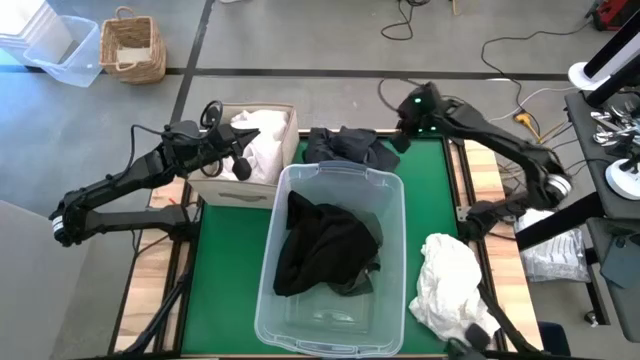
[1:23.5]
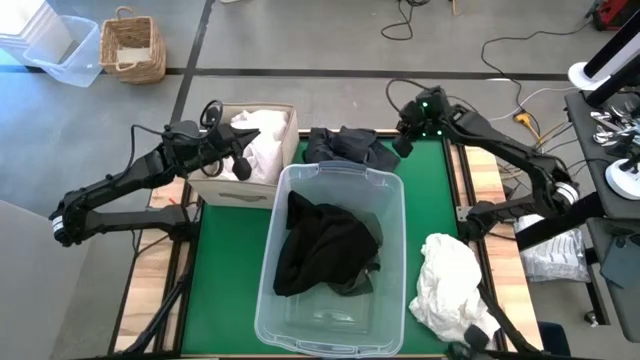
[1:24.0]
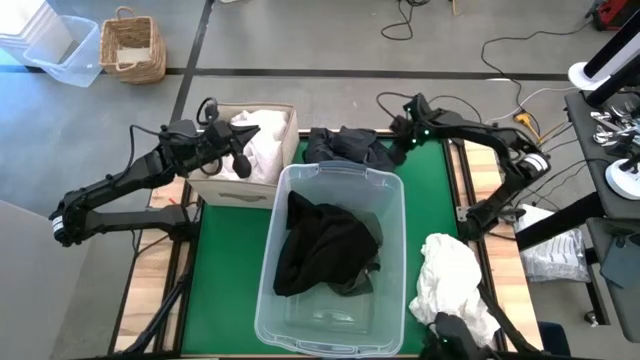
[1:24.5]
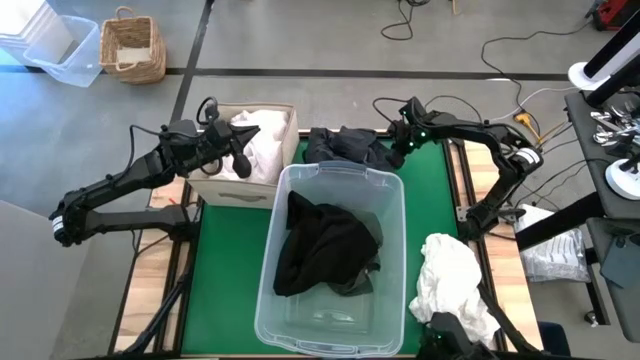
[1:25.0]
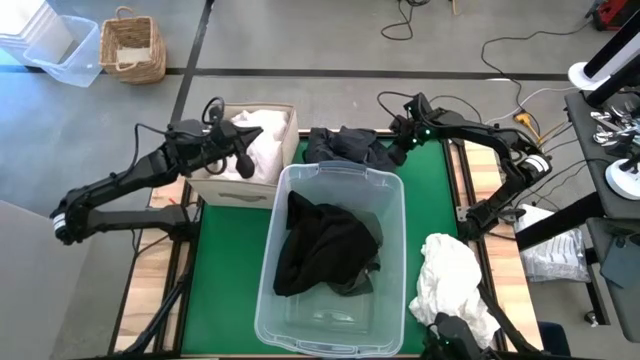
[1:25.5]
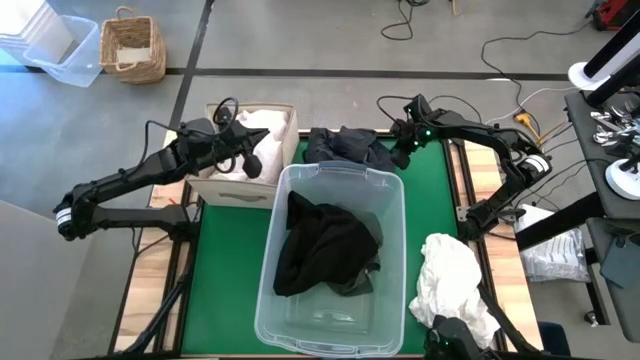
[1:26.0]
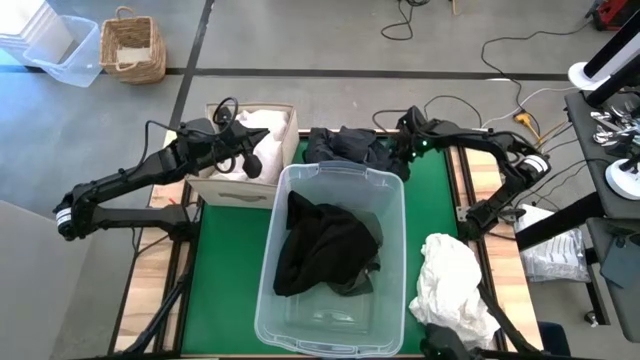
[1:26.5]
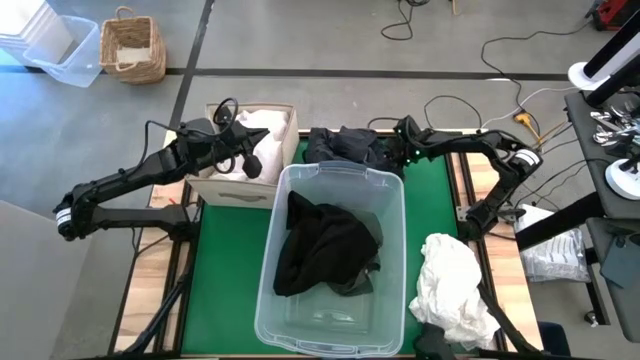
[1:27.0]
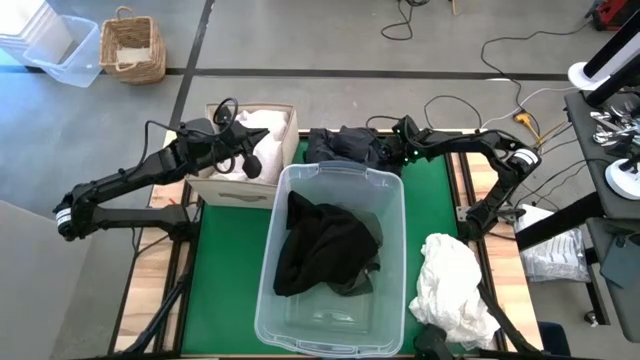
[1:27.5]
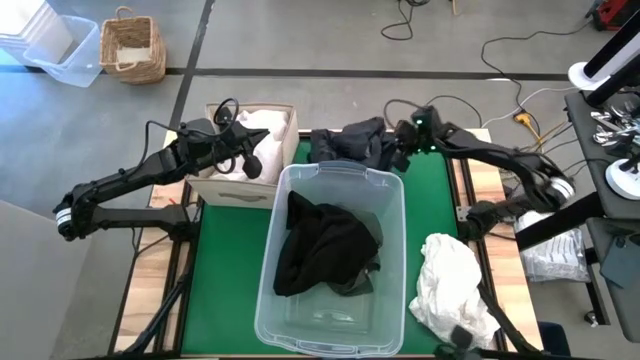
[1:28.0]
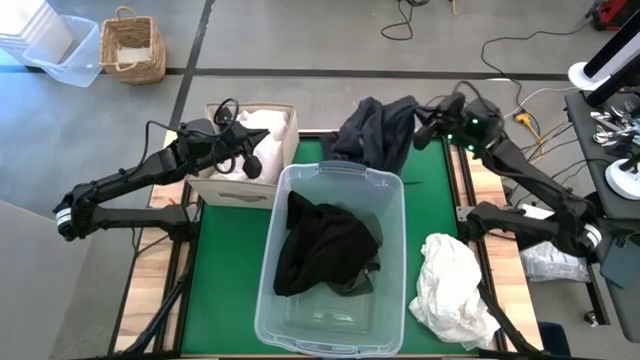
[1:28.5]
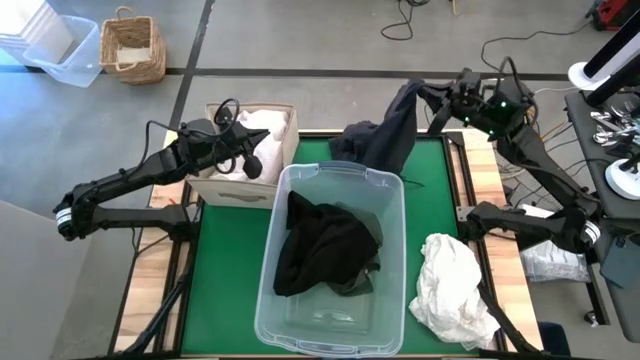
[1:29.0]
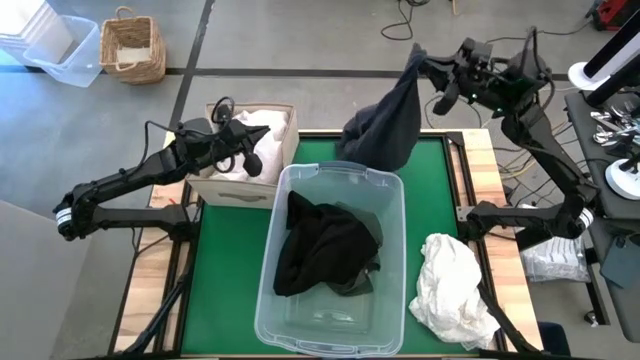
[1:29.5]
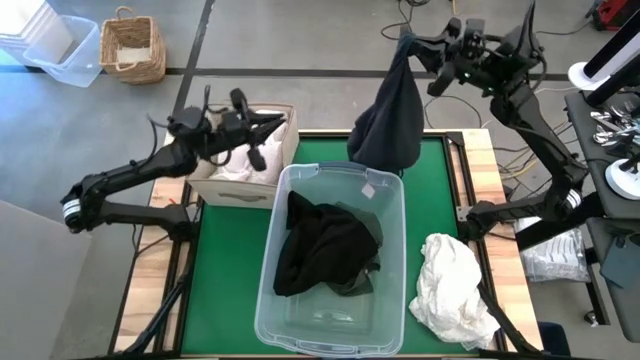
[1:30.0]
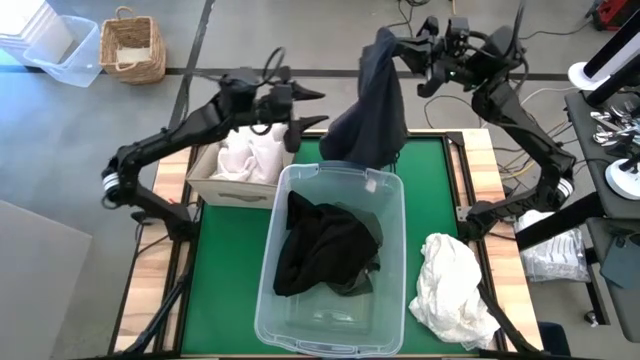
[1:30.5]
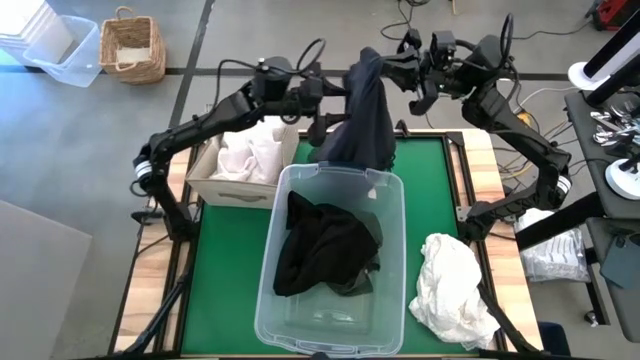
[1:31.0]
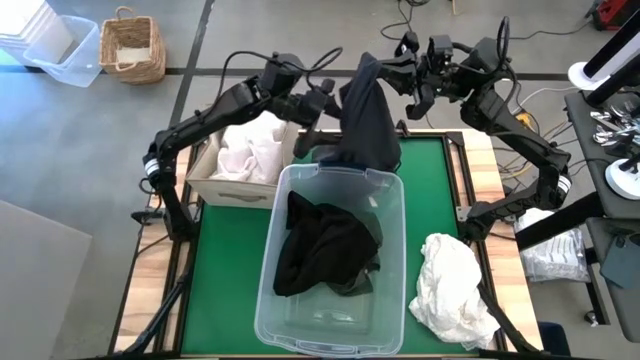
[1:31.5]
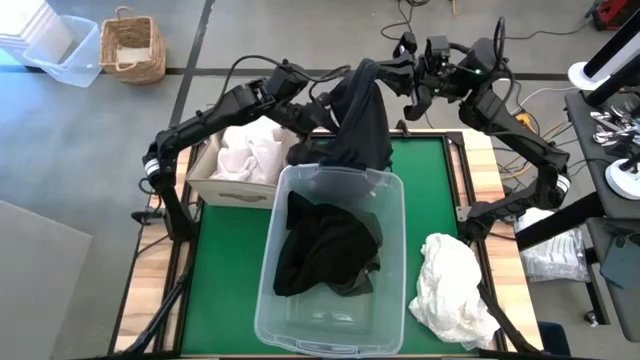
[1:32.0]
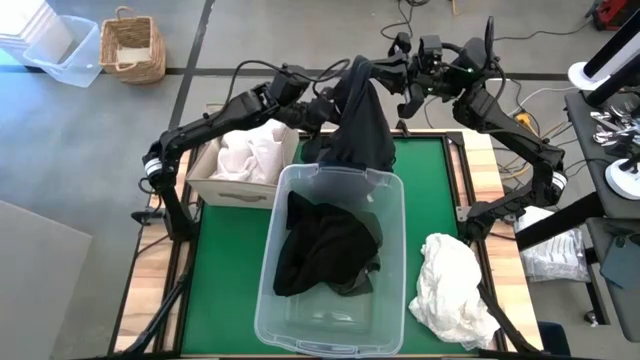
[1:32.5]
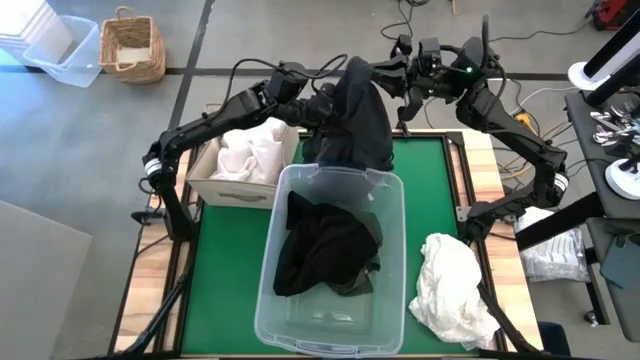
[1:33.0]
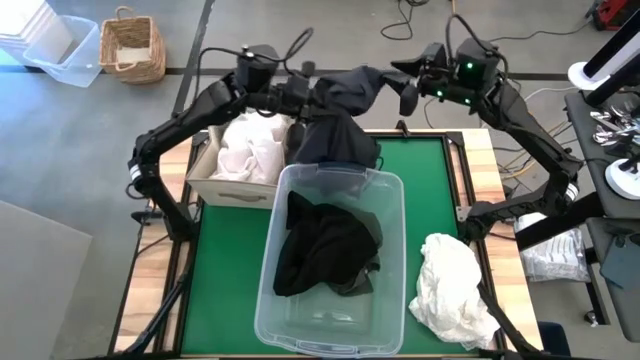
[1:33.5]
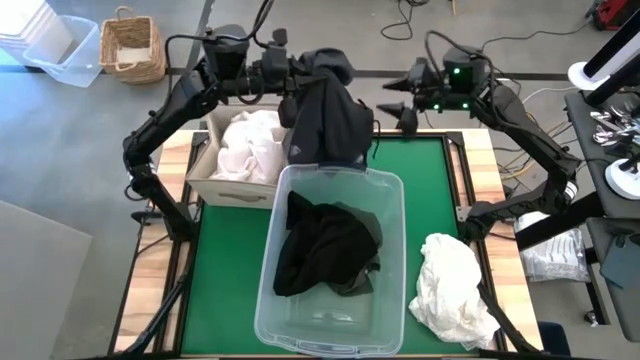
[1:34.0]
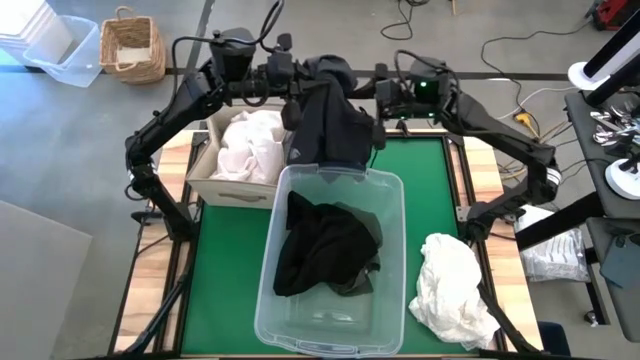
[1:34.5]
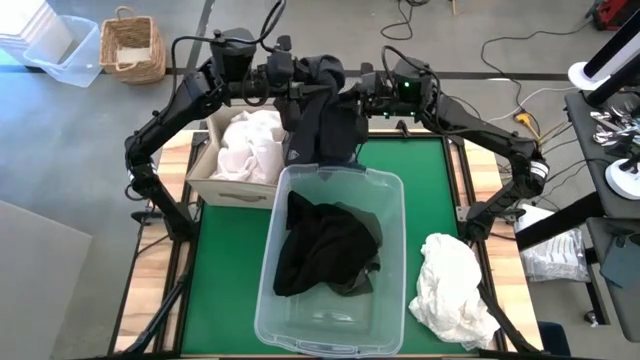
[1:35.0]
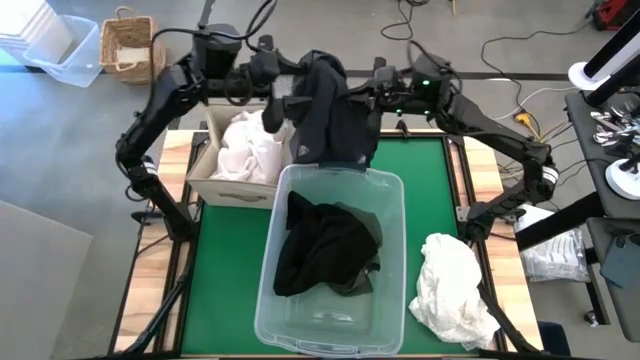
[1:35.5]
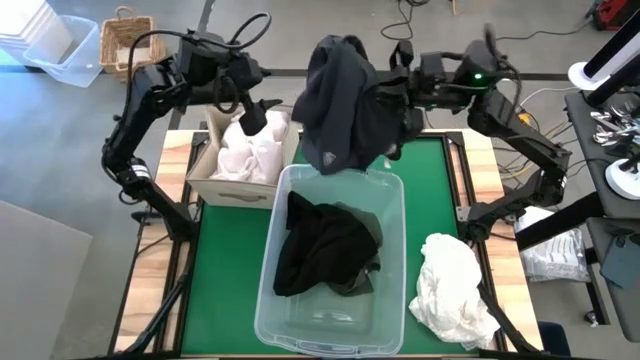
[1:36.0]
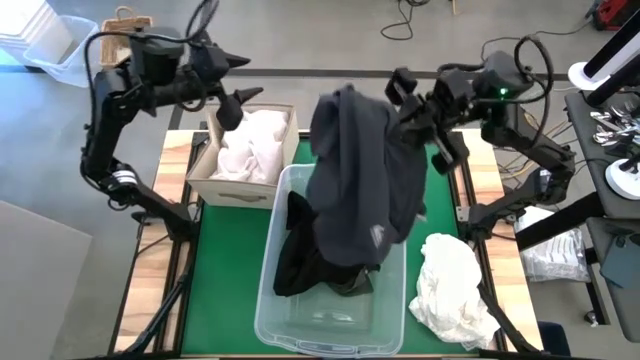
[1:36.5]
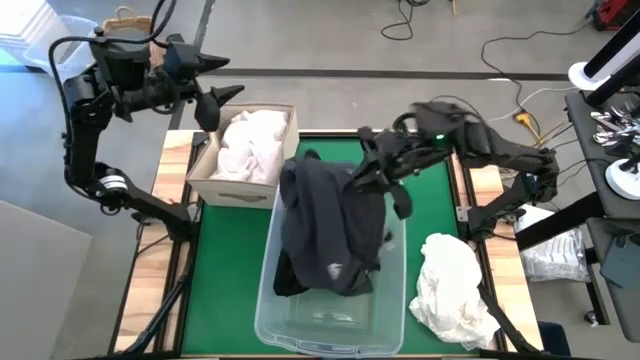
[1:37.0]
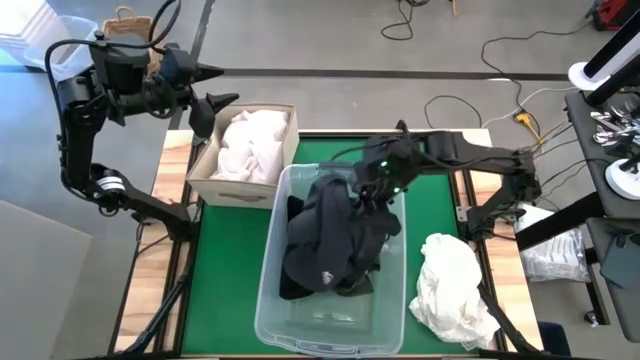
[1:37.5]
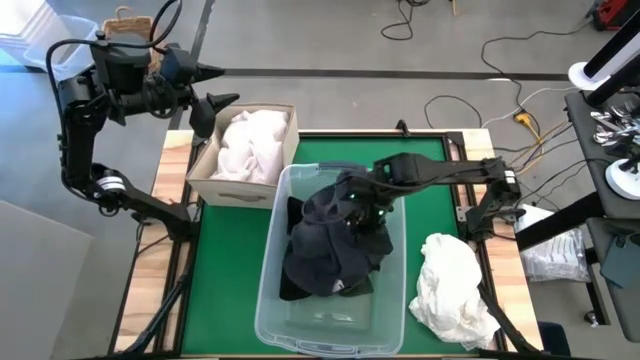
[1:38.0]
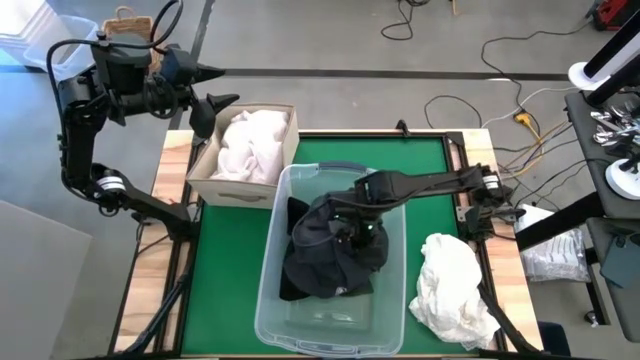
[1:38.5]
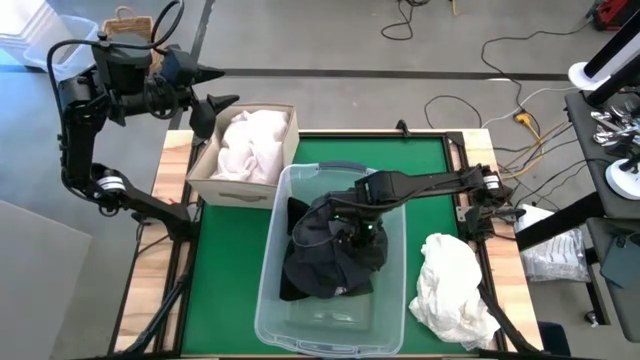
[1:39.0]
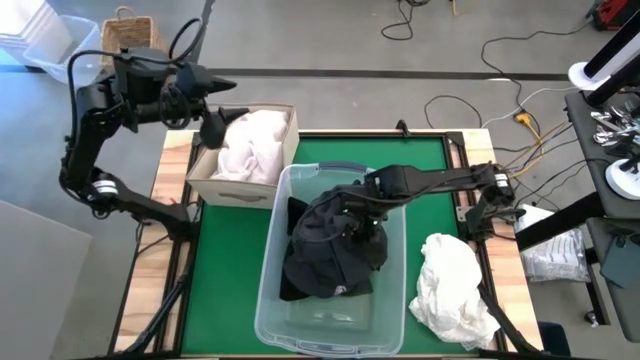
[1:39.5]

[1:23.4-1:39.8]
Put the black shorts into the transparent bin
